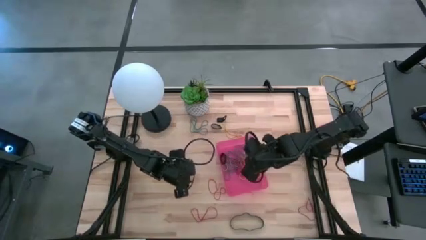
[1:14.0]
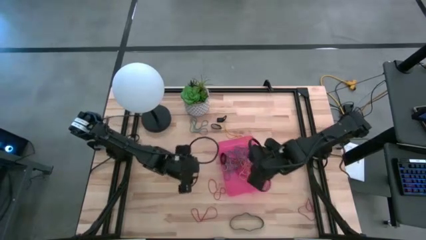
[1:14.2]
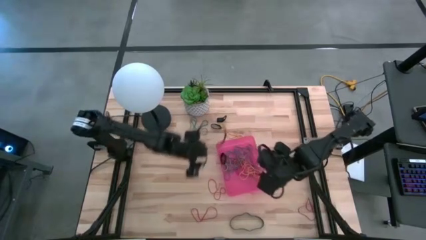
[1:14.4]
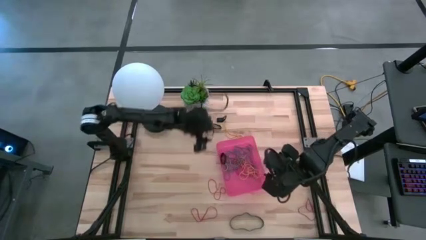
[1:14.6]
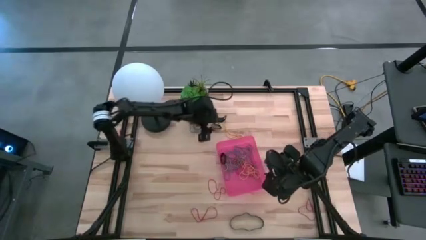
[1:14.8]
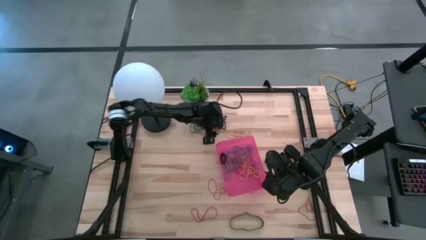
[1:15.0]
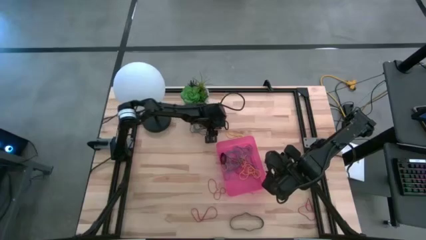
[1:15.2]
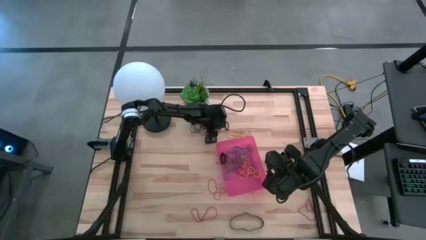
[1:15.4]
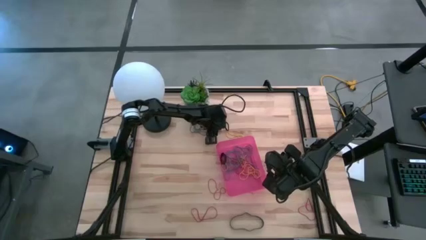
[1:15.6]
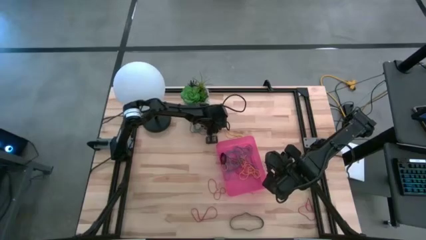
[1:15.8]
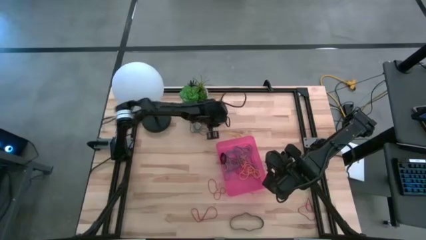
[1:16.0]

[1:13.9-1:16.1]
Task: Pick and place rubber bands into bin
Put the black rubber band into the red bin

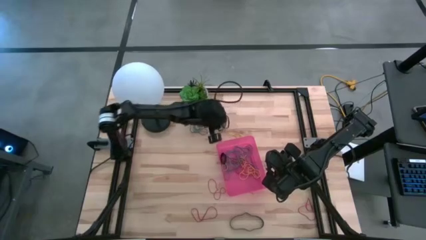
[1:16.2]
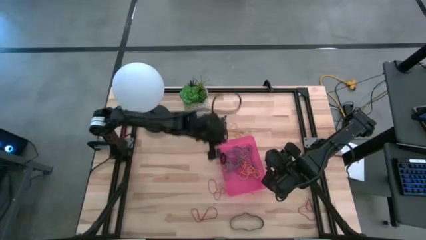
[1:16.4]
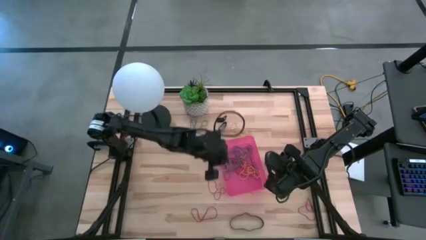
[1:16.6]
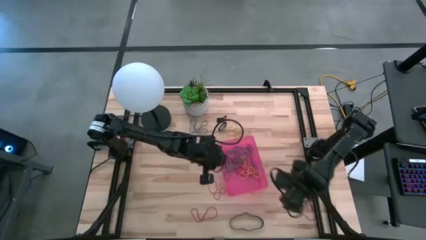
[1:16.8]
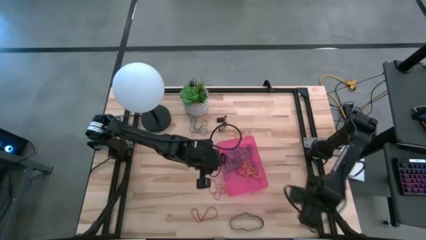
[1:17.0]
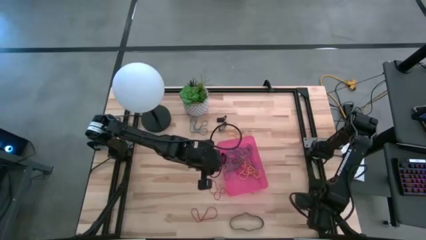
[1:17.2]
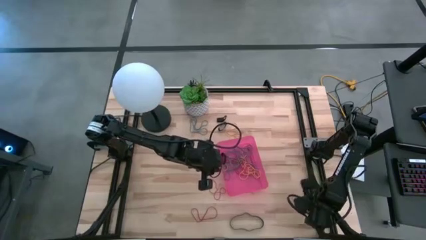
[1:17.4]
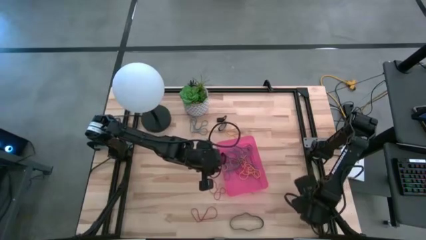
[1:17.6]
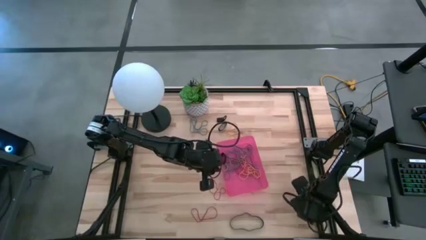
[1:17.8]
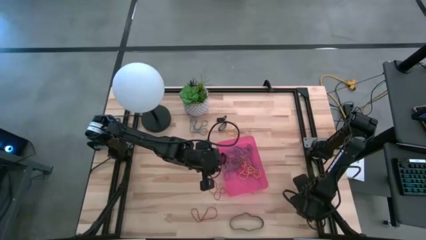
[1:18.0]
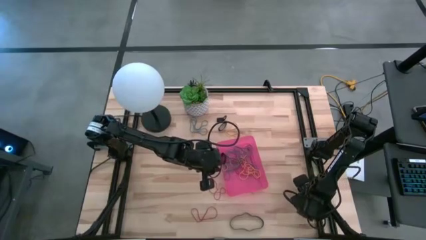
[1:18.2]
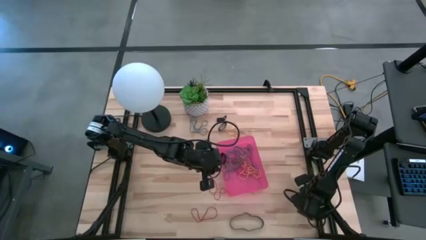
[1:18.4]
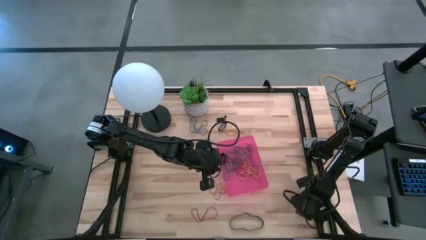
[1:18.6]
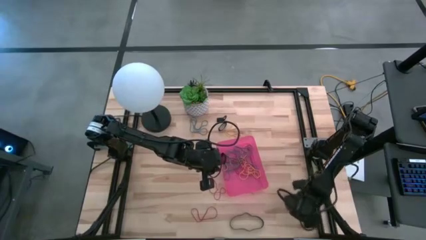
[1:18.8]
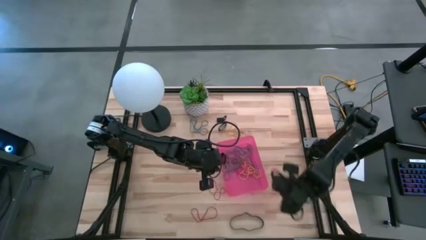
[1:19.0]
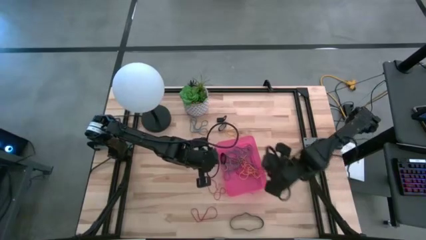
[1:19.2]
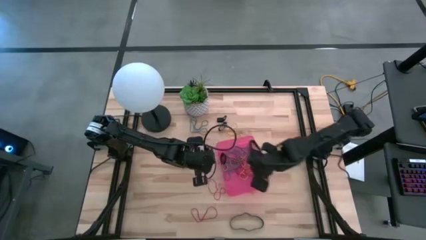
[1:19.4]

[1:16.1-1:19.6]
Put the bottom right red rubber band into the red bin

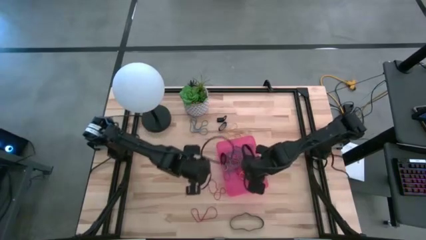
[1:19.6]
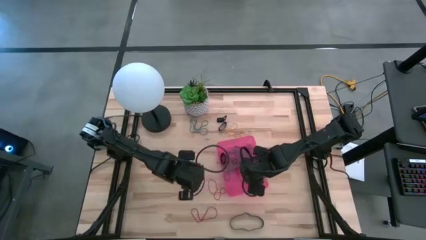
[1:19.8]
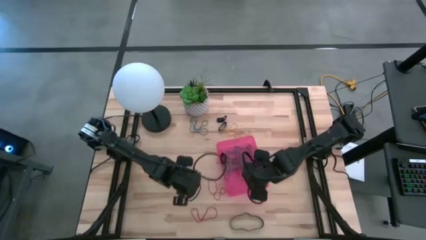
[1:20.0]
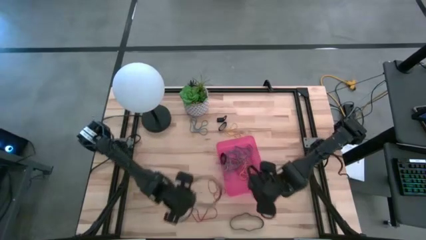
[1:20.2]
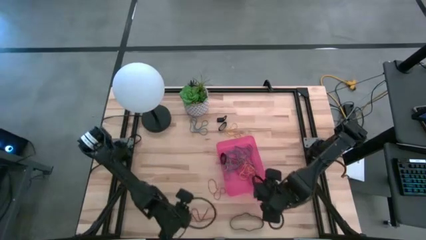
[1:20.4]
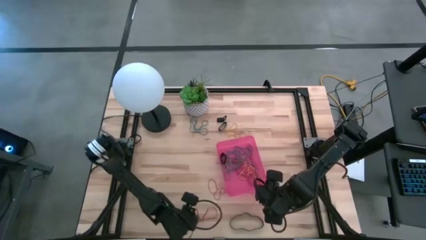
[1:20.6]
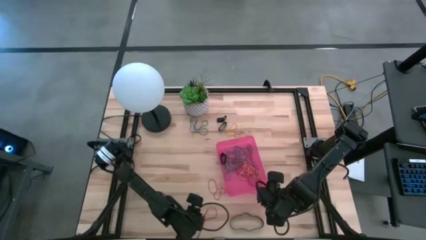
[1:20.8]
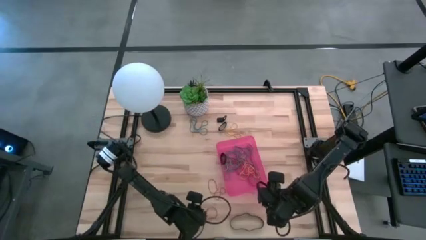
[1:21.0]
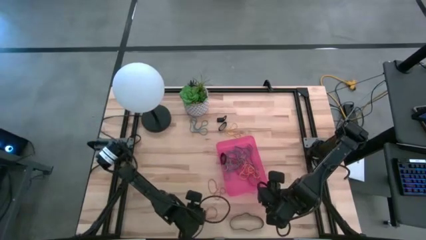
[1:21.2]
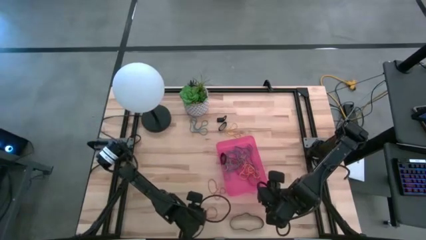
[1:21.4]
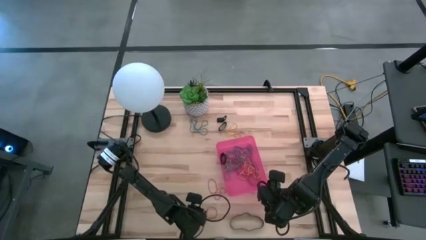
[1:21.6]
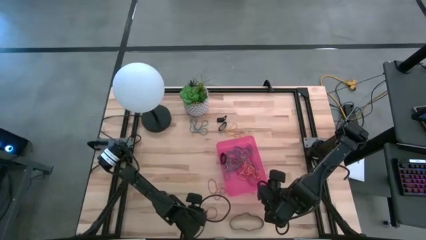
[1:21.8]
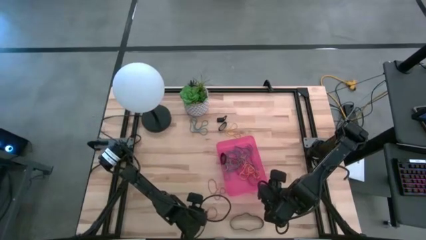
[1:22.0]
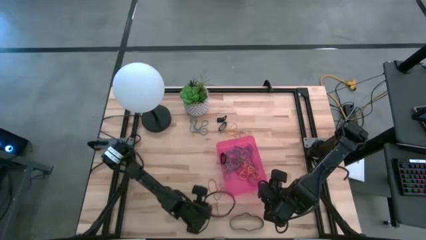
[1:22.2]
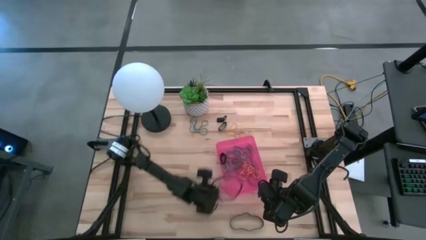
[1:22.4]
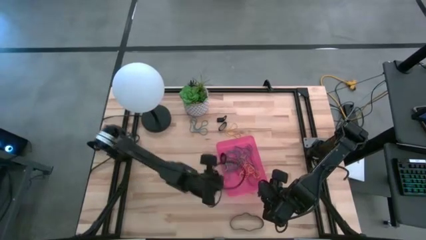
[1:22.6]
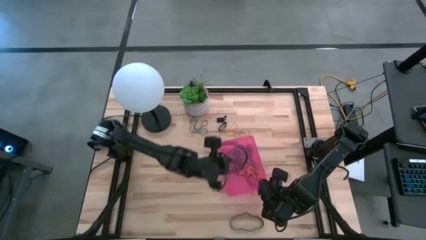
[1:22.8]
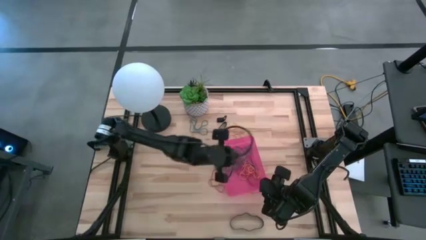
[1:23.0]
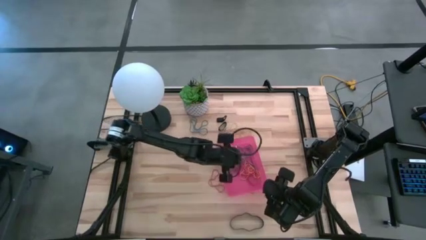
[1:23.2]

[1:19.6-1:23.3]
Put the bottom red rubber band into the red bin

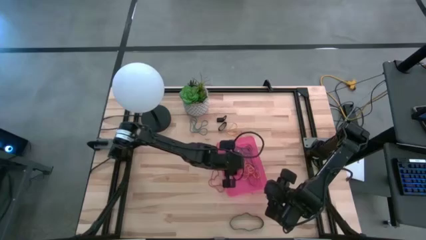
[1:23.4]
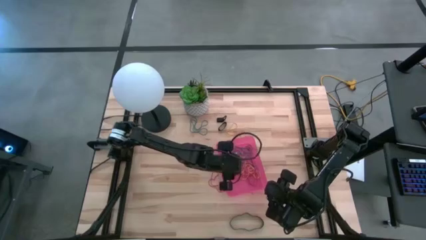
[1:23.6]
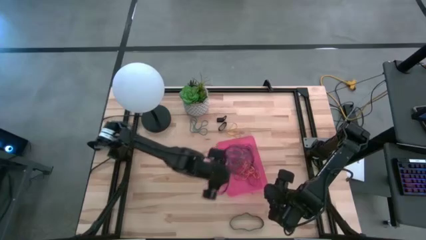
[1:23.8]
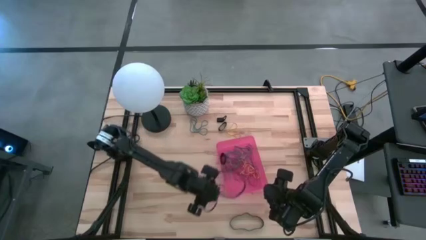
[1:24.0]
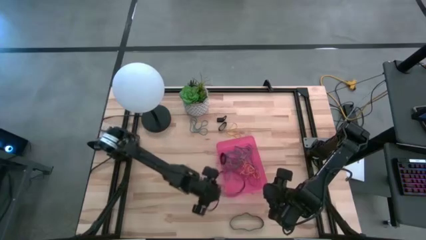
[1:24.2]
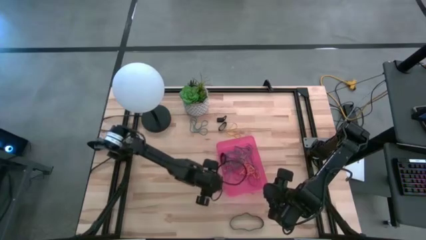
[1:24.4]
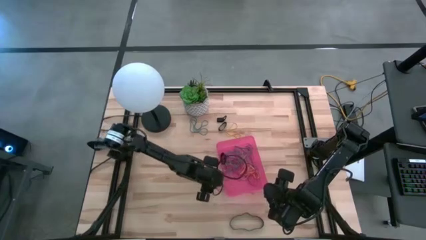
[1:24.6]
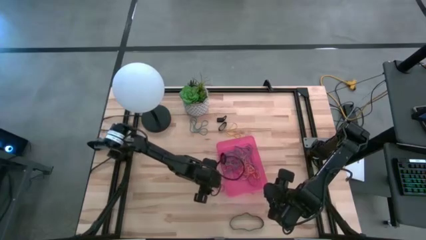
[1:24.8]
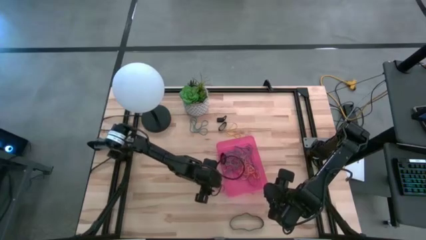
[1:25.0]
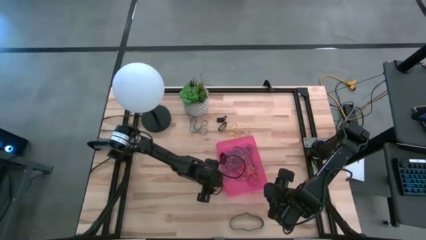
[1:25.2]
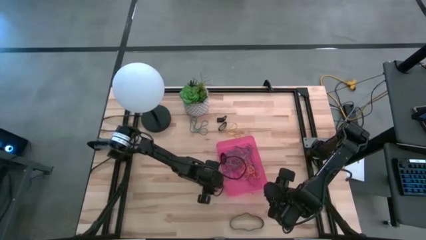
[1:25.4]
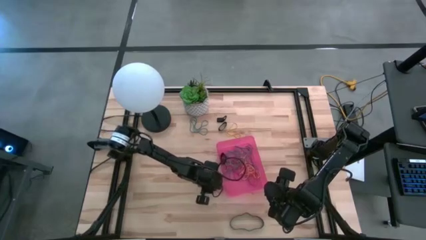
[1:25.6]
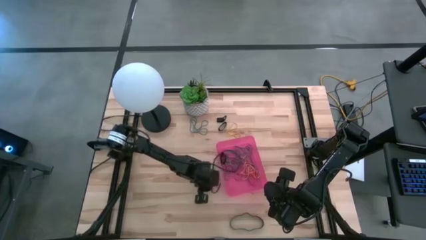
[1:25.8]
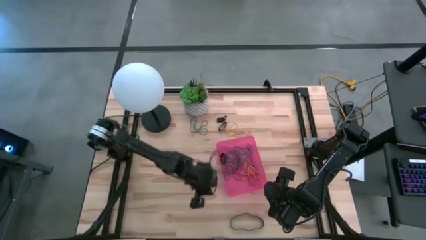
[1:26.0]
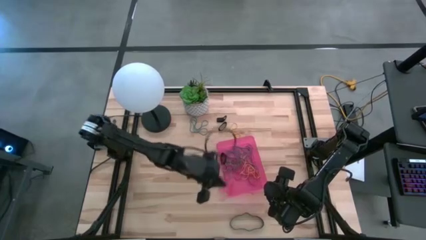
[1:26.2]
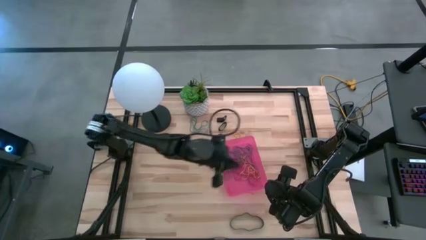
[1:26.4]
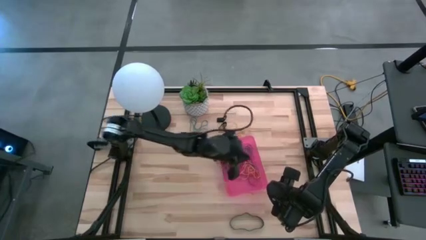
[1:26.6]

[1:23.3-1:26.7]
Put the red rubber band into the red bin

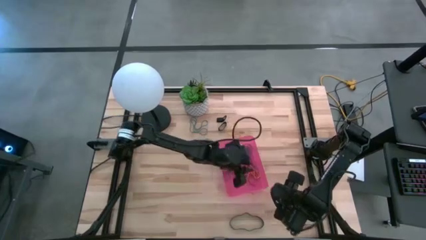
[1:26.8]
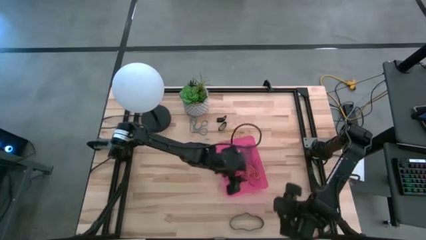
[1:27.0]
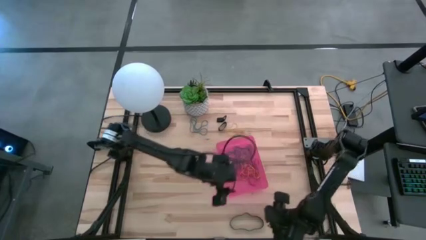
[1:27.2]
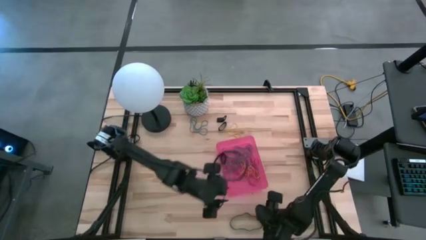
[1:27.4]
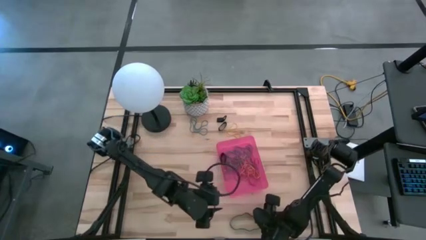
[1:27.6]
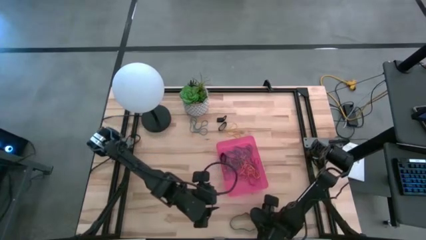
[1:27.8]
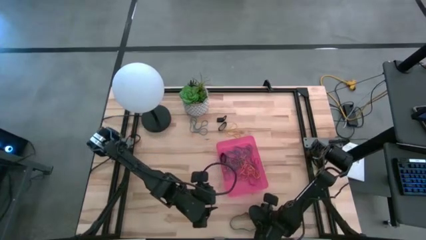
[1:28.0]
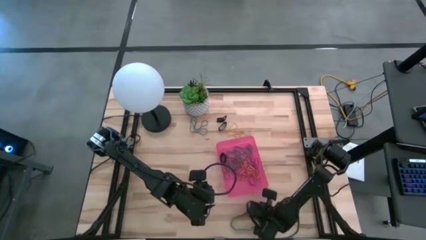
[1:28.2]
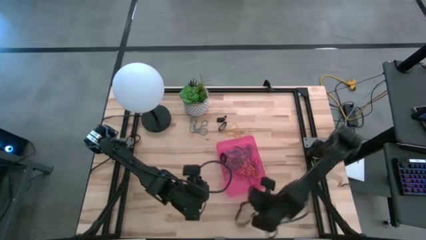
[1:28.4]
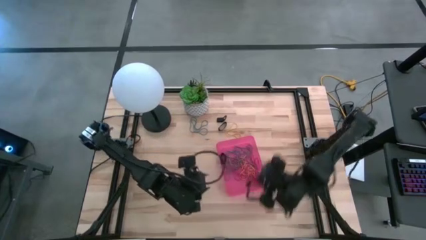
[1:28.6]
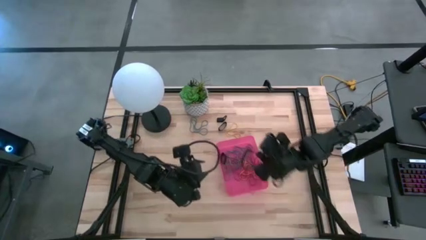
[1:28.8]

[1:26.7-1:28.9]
Put the bottom black rubber band into the red bin

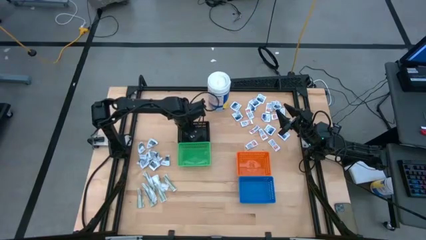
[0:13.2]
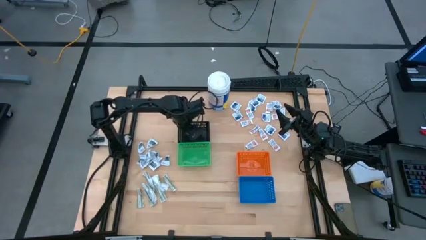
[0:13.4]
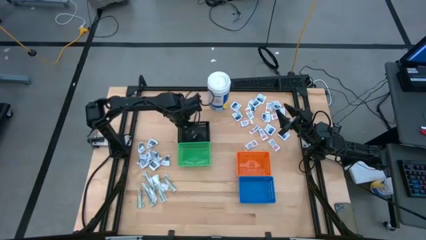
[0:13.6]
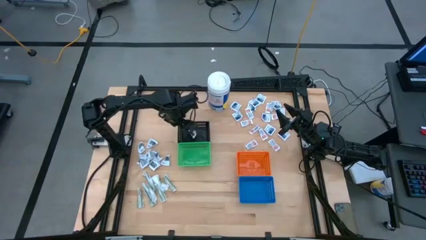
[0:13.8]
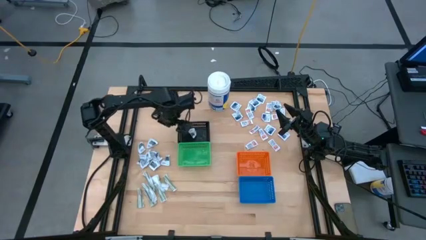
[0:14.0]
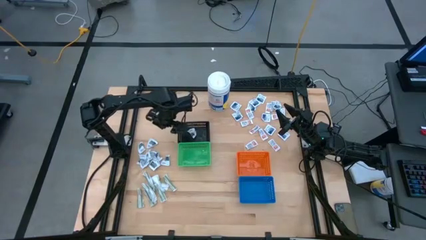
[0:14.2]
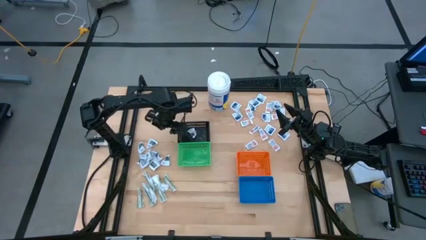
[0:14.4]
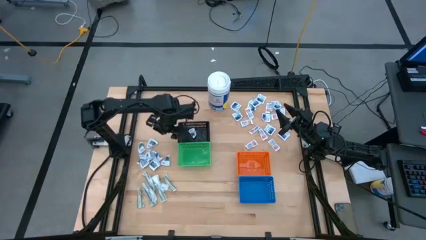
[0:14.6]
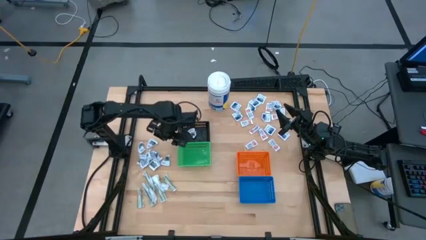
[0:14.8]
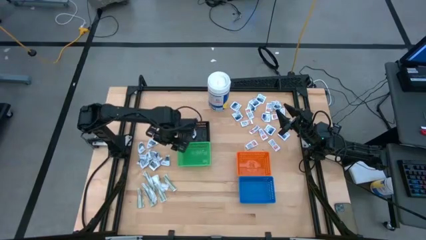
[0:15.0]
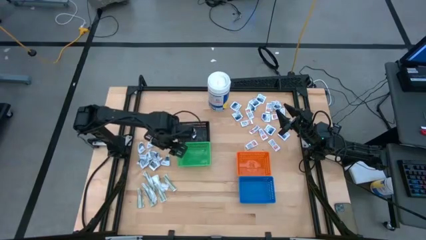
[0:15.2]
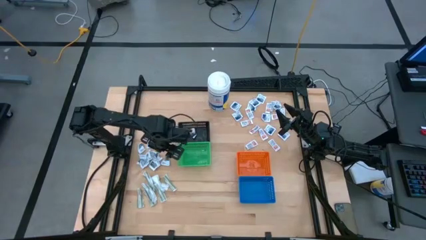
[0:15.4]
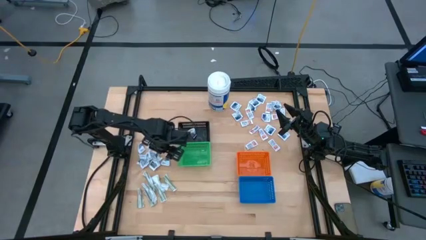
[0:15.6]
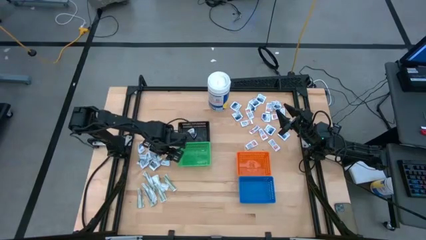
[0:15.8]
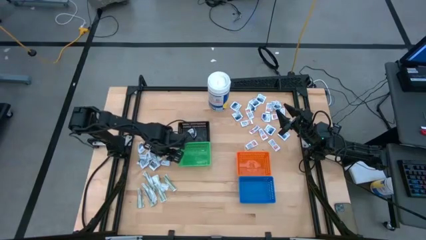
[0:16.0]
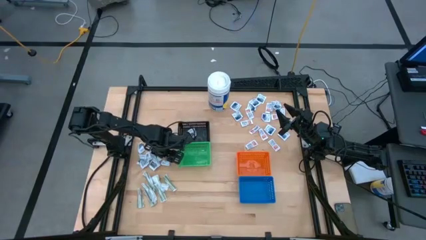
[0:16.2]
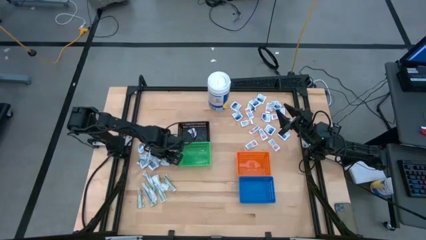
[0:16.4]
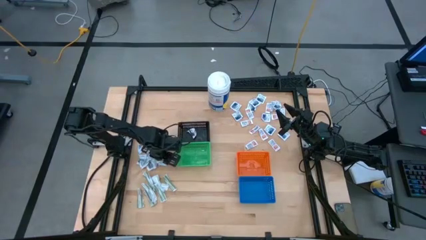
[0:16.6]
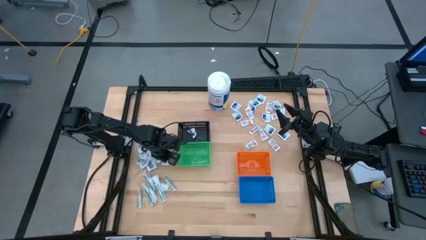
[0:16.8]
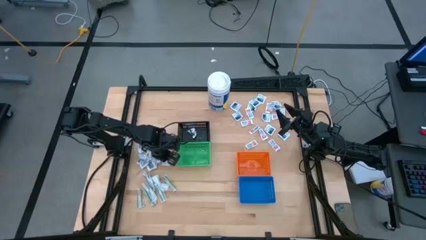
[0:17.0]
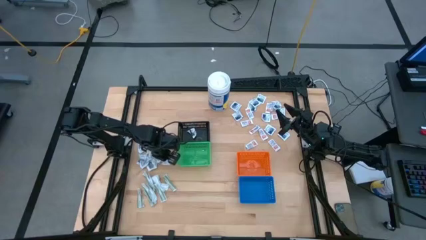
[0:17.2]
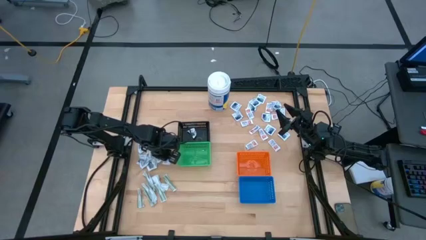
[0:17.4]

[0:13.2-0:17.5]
Task: Pick & Place First Aid Supplies
Put the black pad into the black bin
